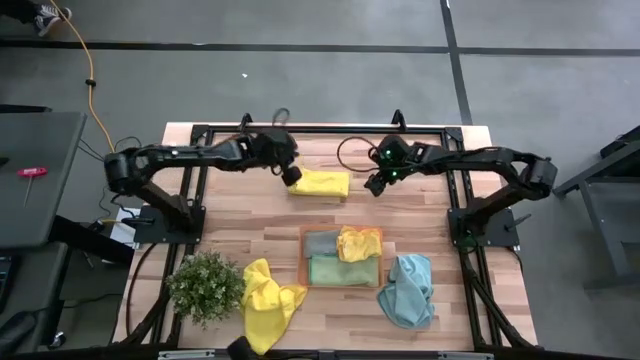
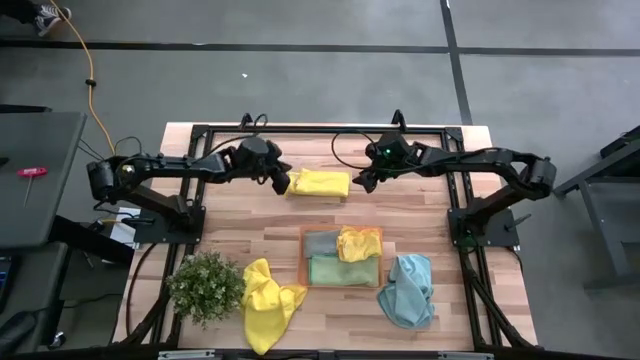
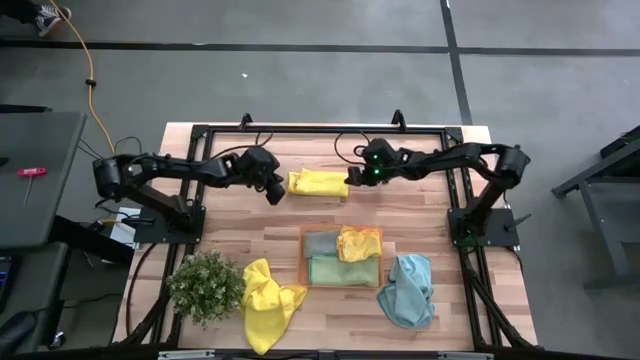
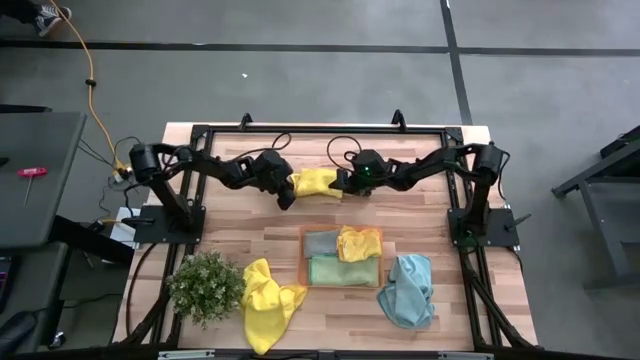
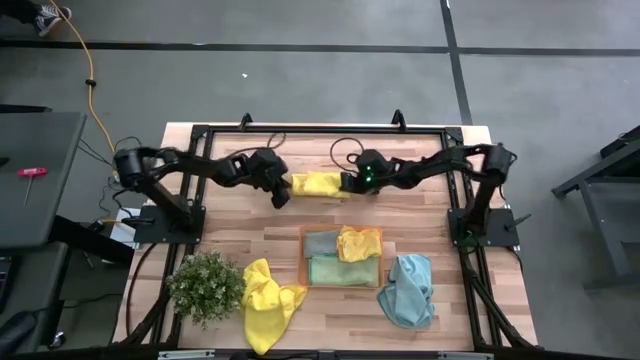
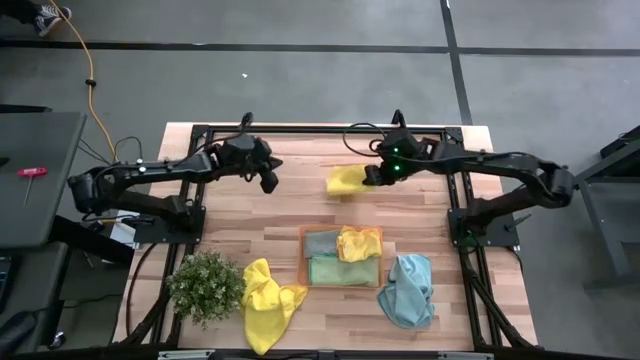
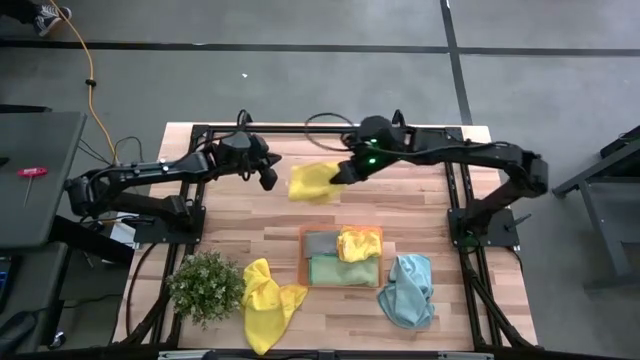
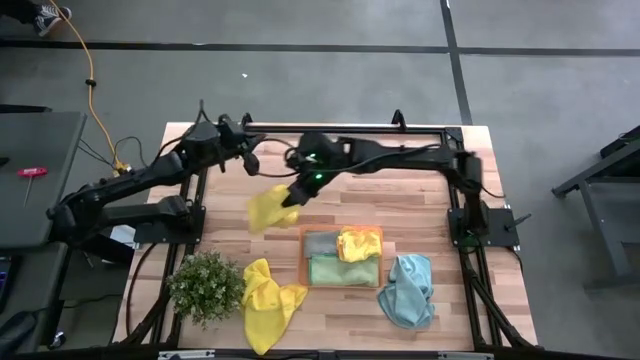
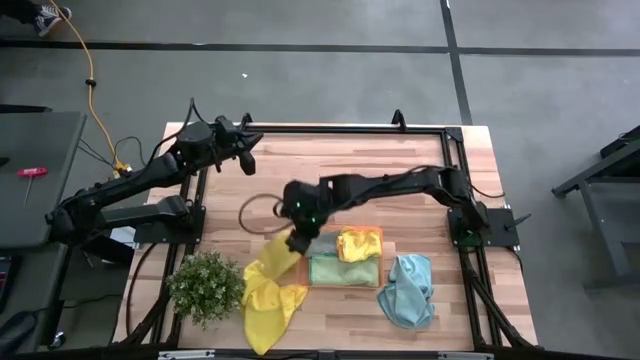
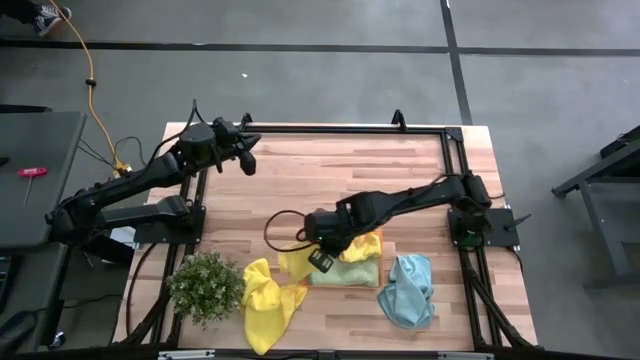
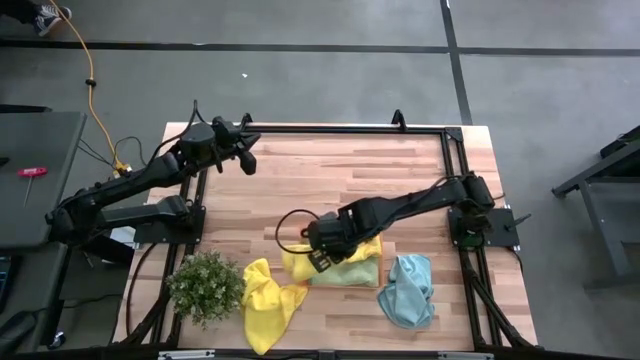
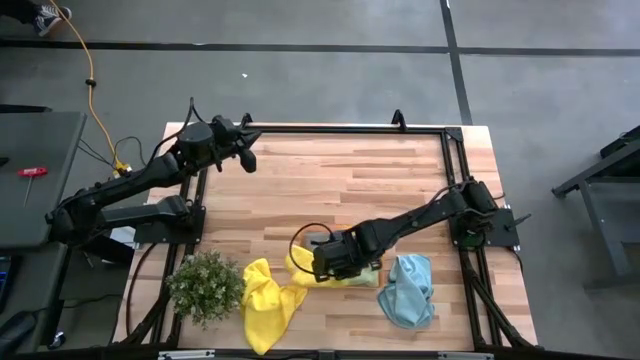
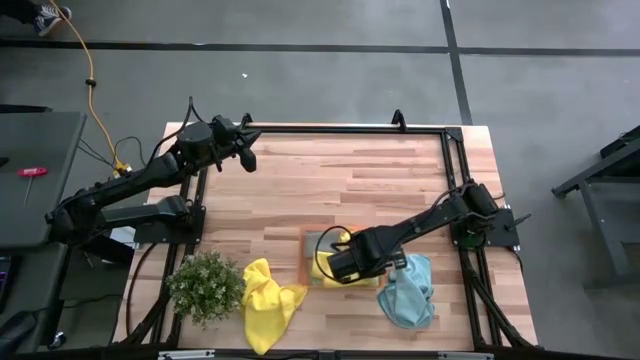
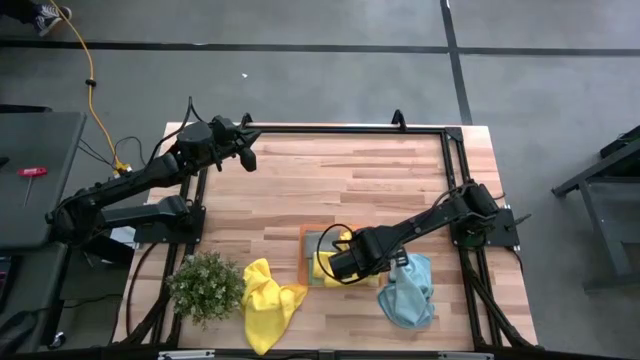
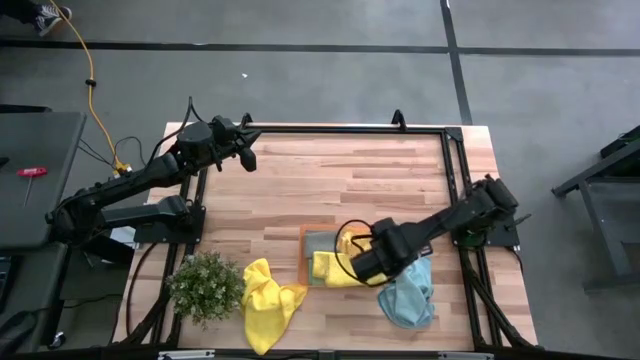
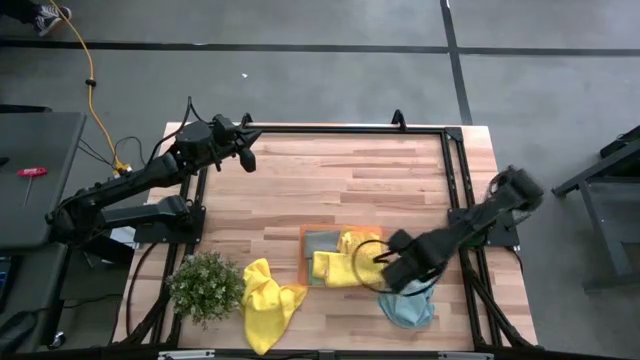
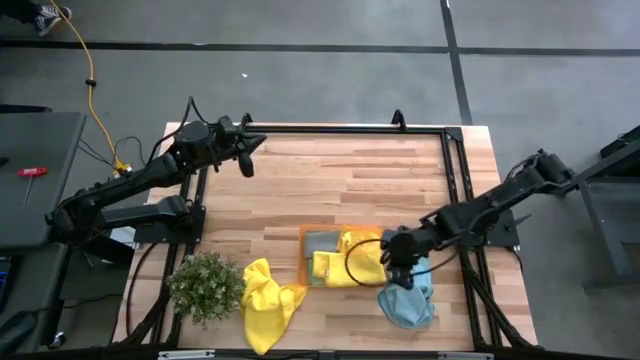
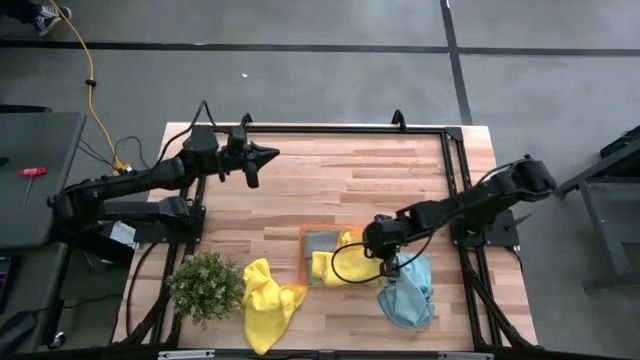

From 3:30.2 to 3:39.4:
Task: Fold microfiber towels
Put the right yellow microfiber towel into the orange bin

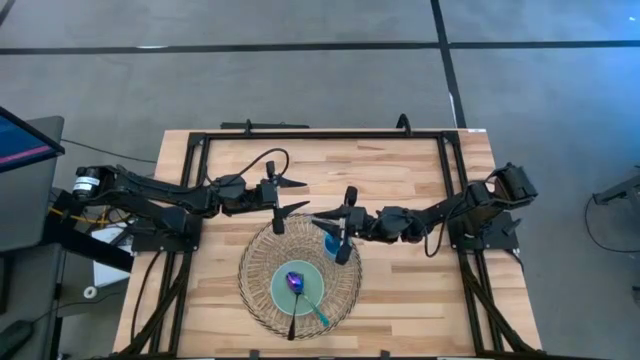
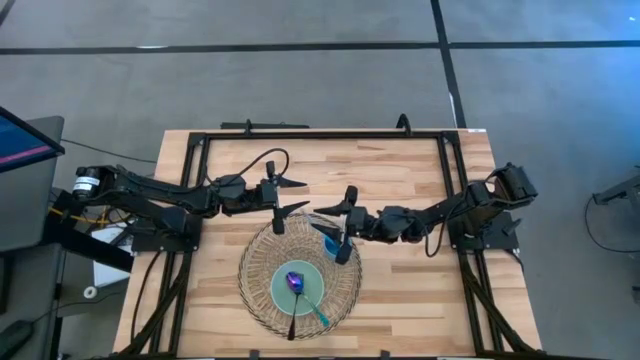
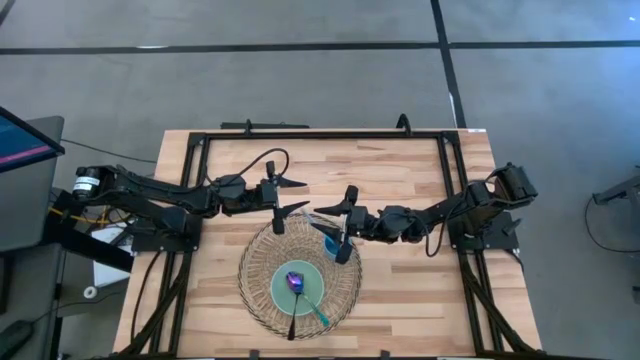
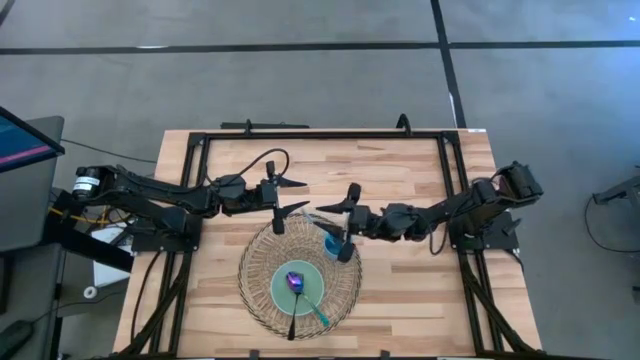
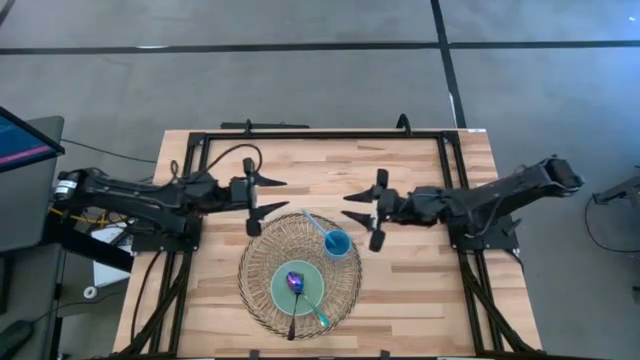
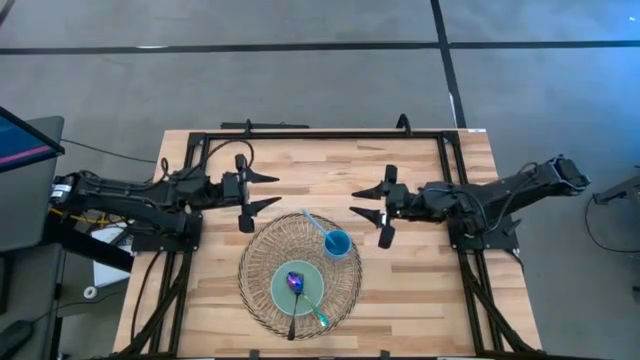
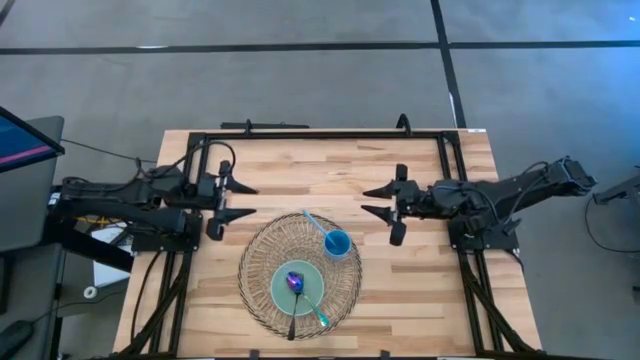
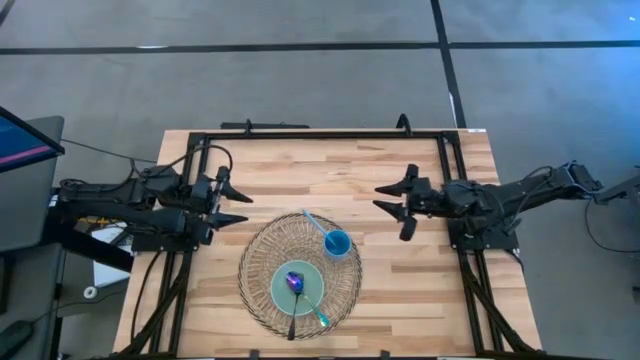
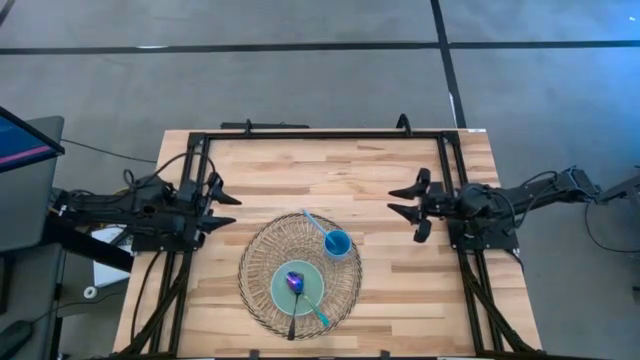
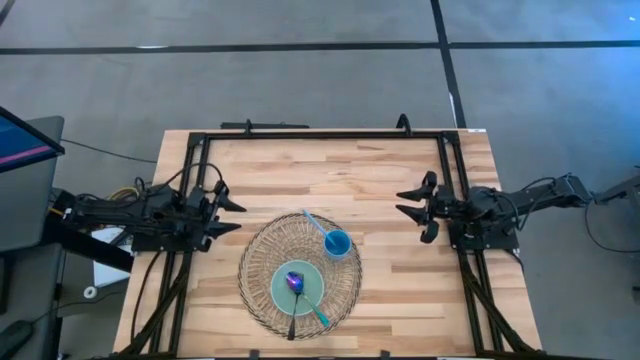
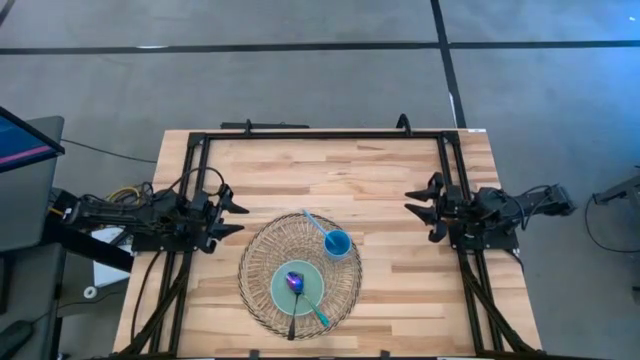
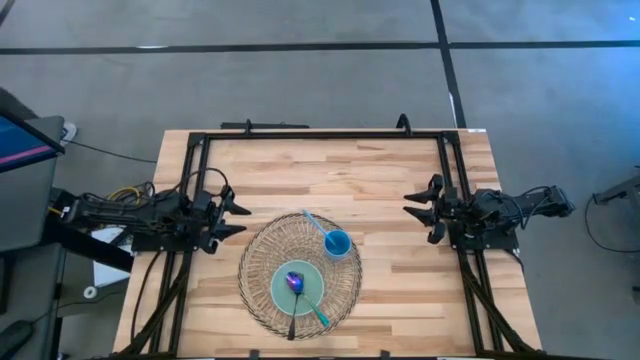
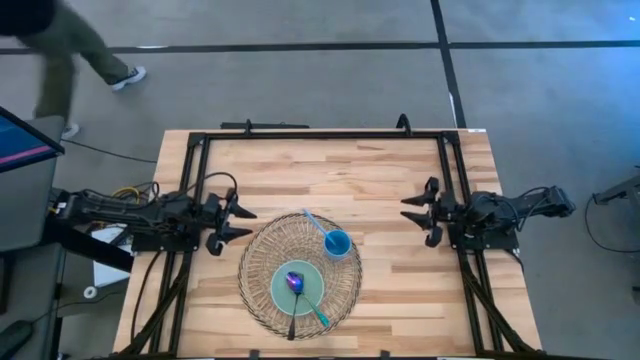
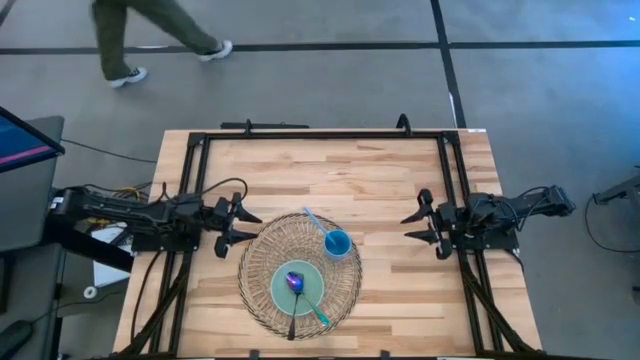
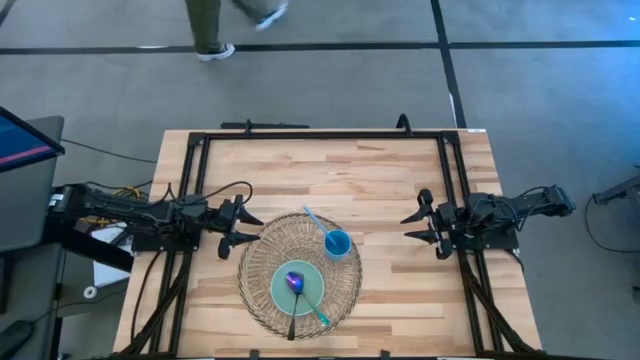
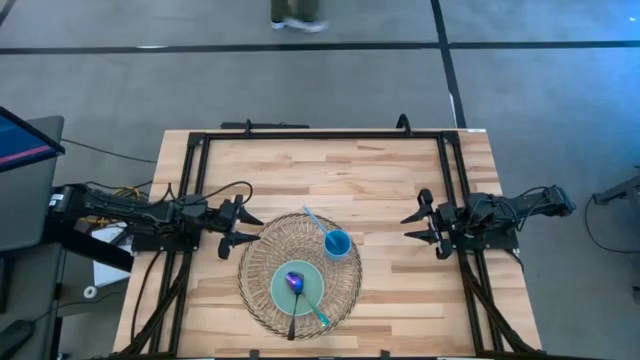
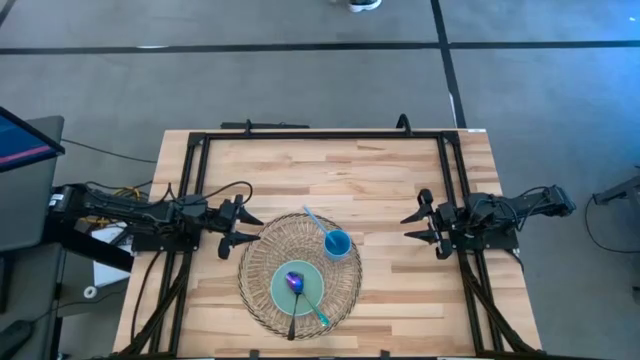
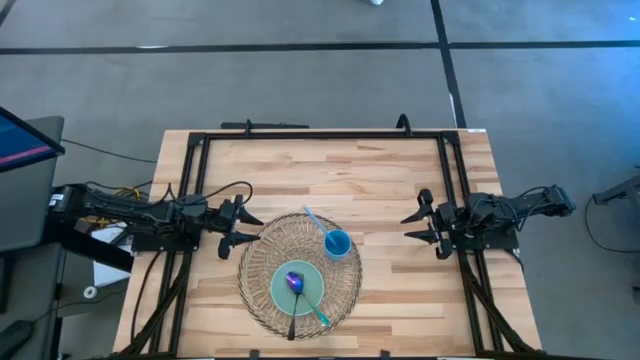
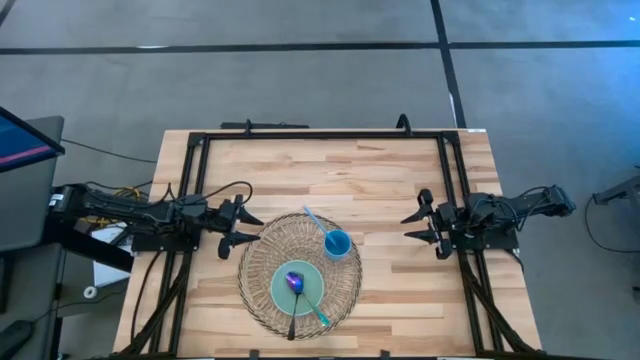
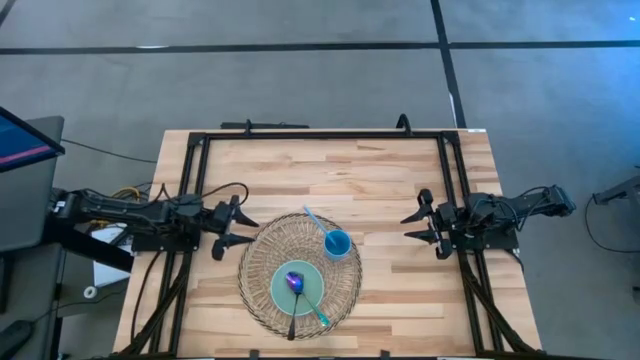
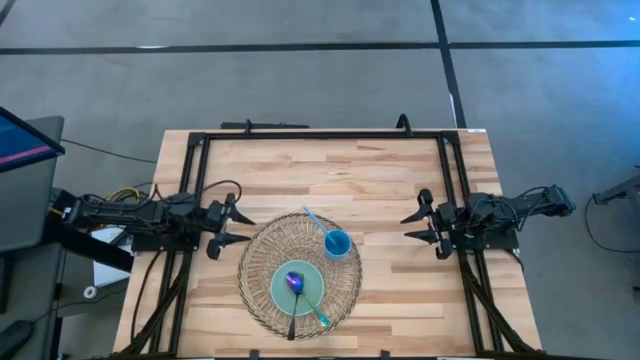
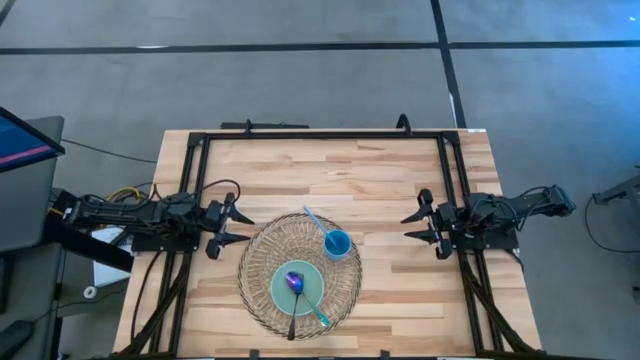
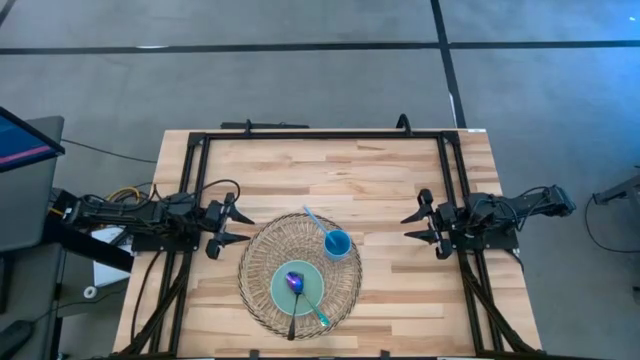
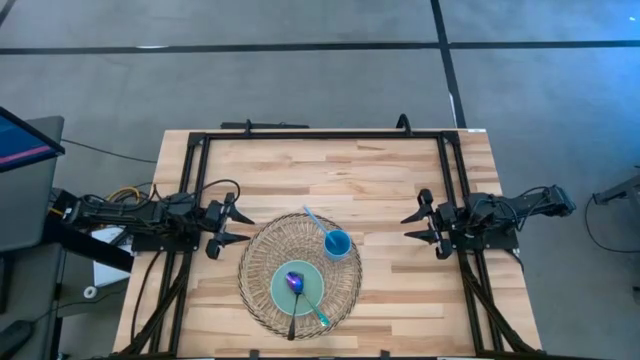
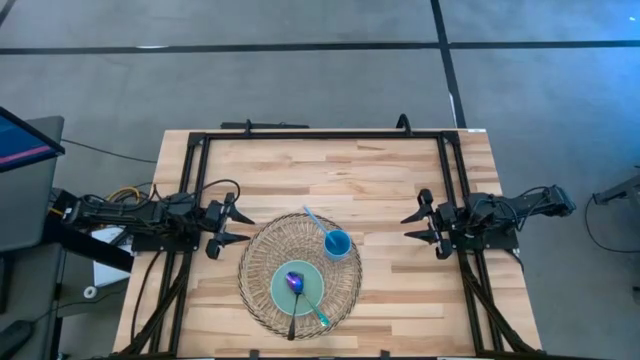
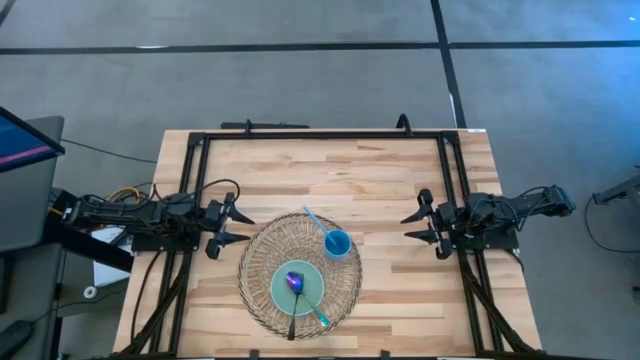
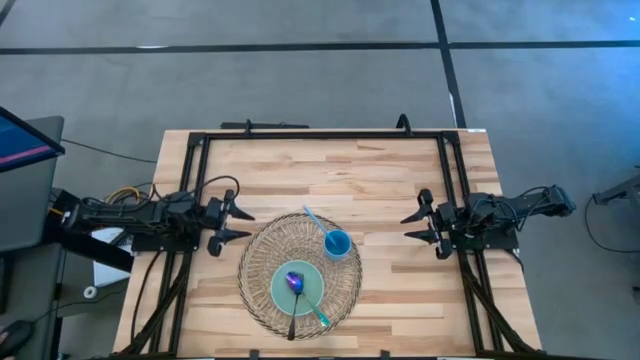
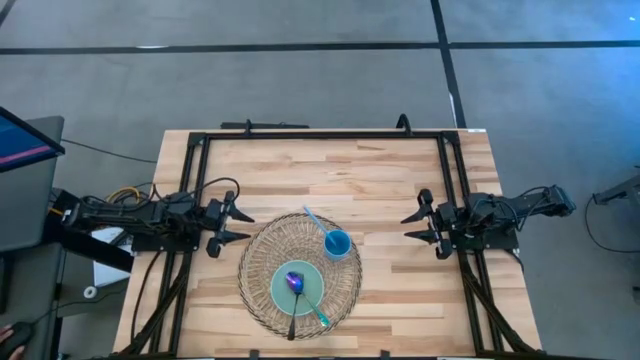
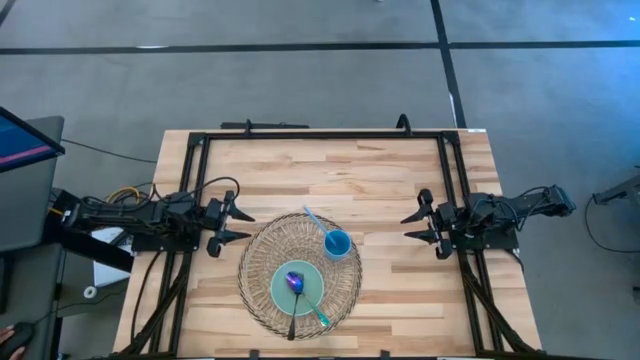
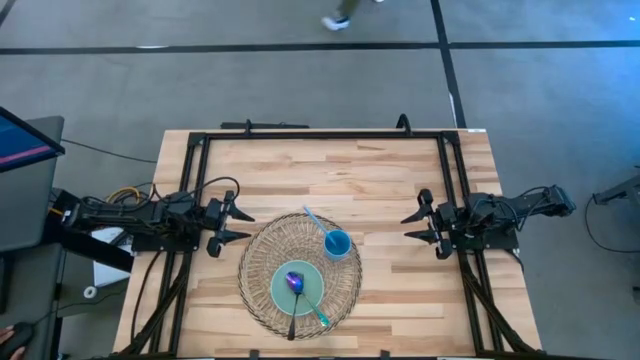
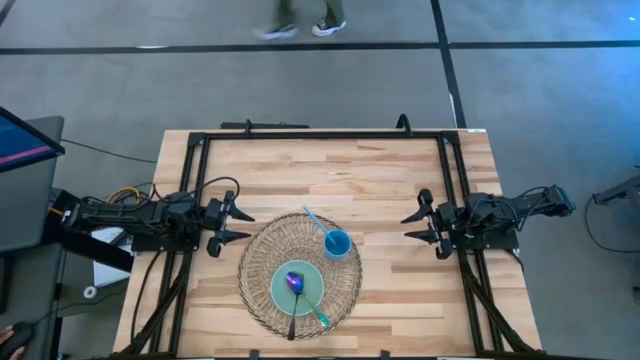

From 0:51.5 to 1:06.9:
Task: Pick & Place Utensil
Return to Home Position
